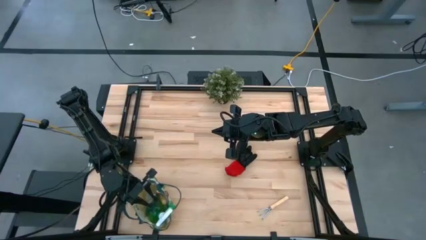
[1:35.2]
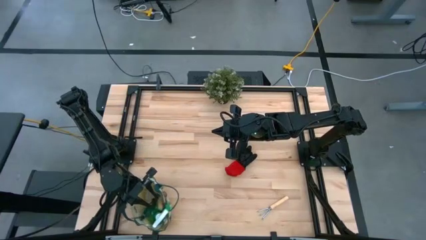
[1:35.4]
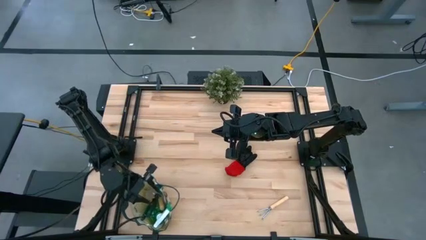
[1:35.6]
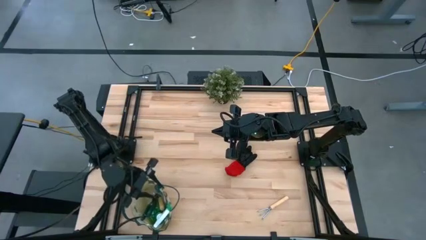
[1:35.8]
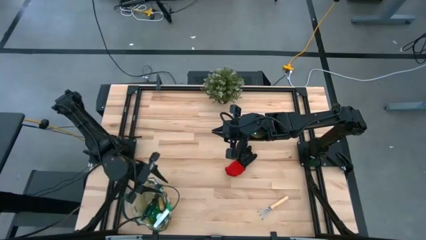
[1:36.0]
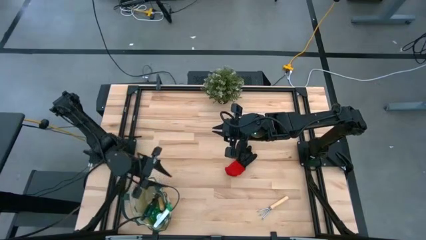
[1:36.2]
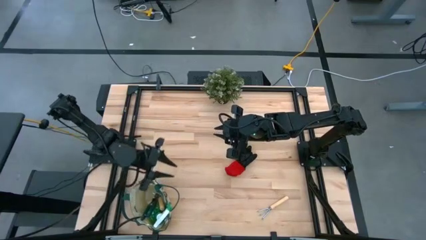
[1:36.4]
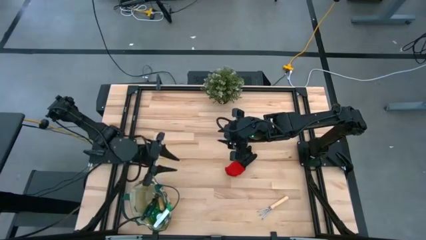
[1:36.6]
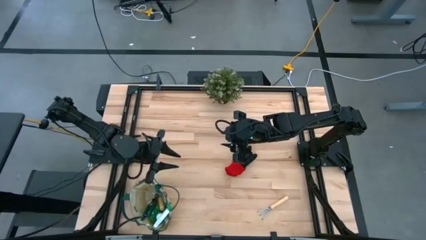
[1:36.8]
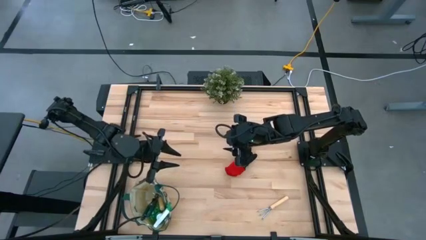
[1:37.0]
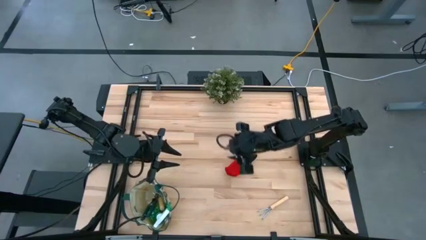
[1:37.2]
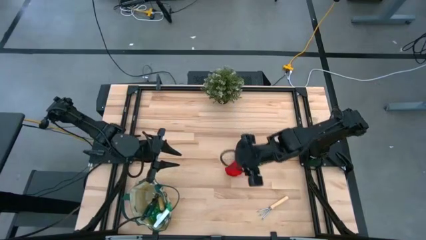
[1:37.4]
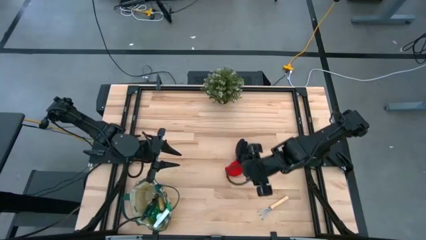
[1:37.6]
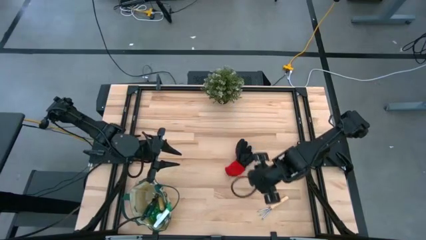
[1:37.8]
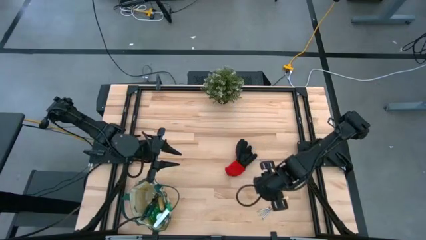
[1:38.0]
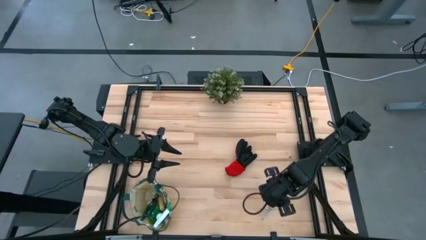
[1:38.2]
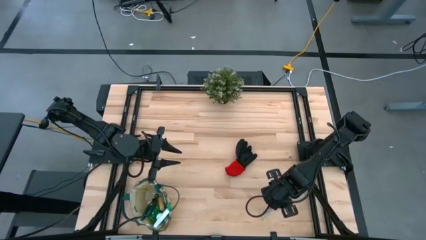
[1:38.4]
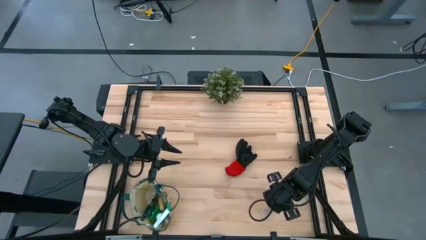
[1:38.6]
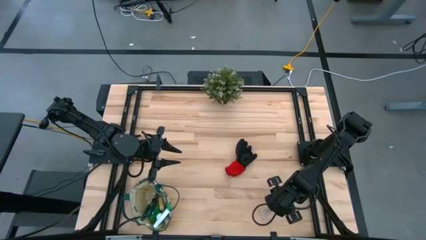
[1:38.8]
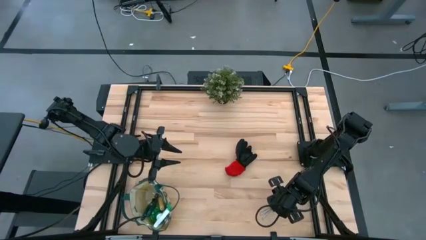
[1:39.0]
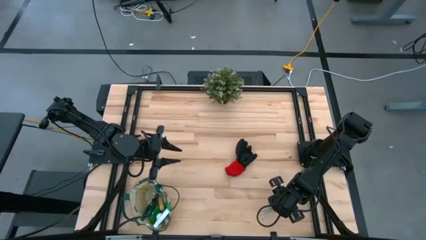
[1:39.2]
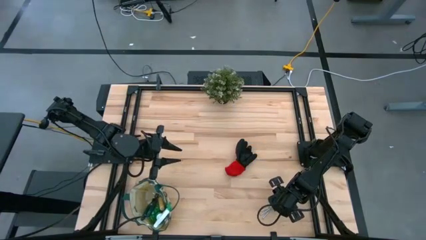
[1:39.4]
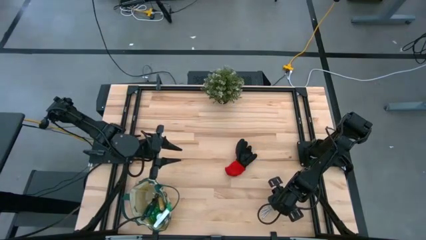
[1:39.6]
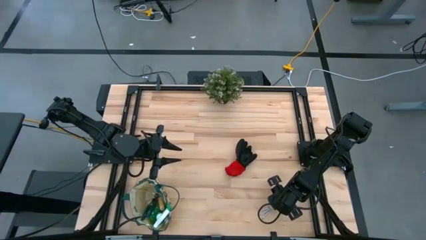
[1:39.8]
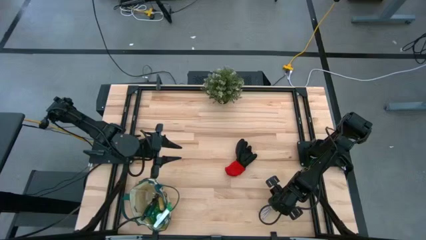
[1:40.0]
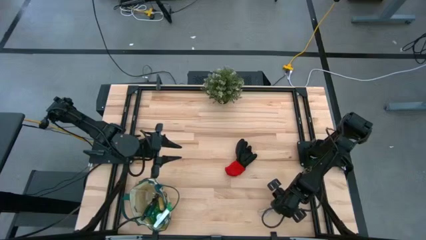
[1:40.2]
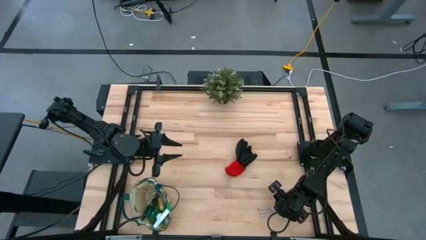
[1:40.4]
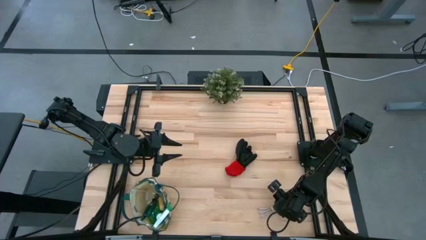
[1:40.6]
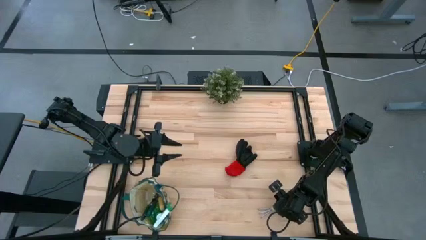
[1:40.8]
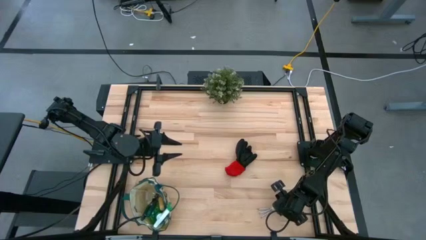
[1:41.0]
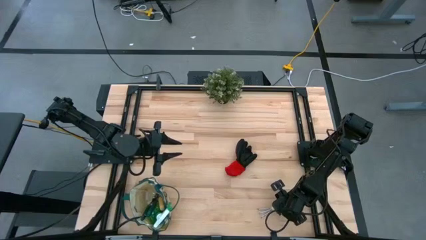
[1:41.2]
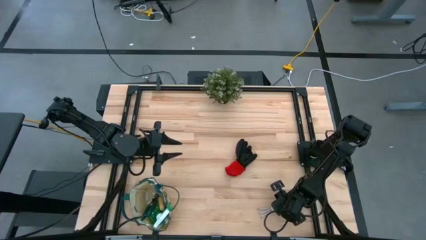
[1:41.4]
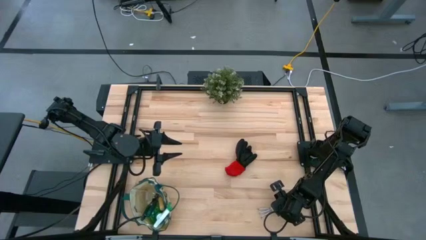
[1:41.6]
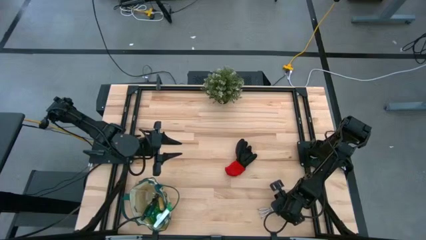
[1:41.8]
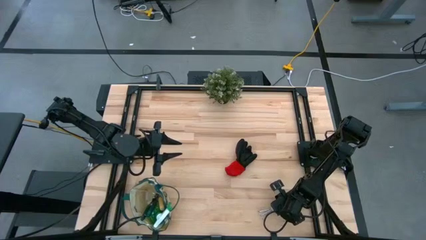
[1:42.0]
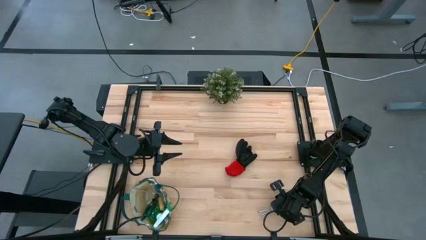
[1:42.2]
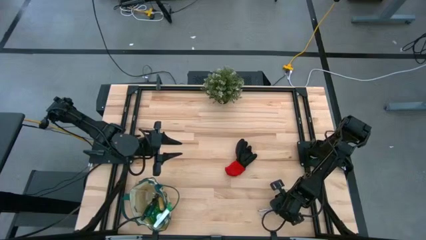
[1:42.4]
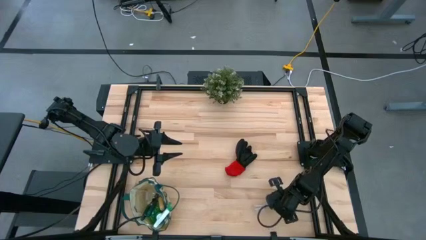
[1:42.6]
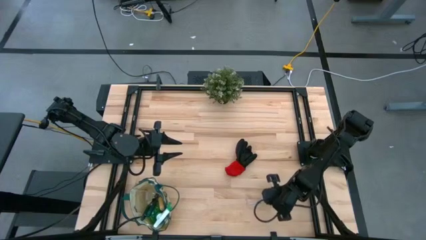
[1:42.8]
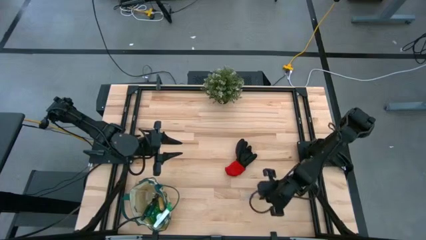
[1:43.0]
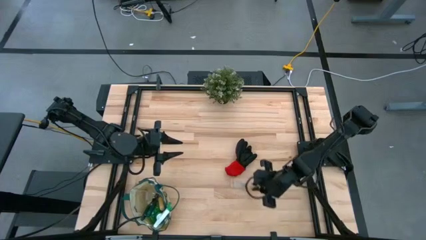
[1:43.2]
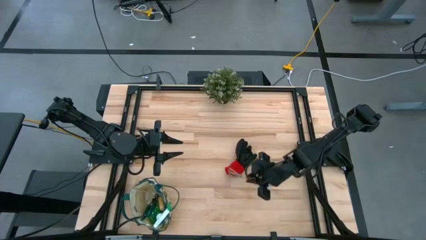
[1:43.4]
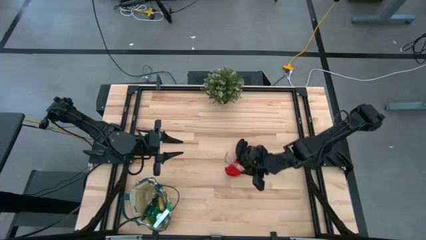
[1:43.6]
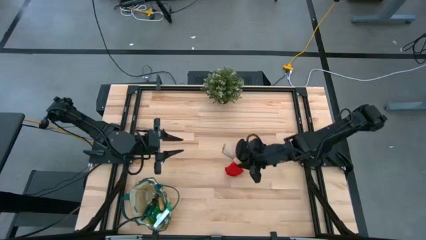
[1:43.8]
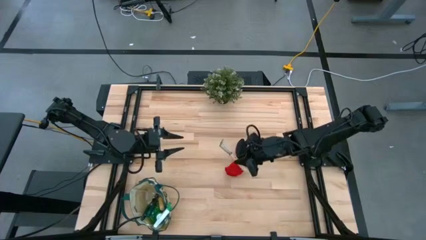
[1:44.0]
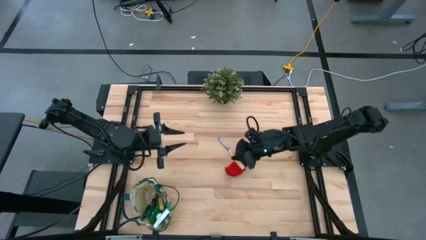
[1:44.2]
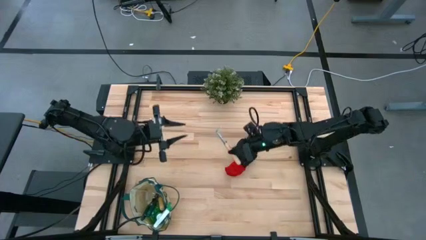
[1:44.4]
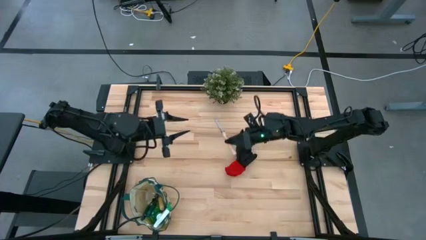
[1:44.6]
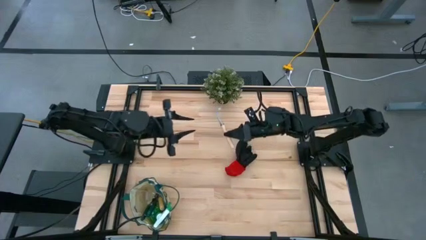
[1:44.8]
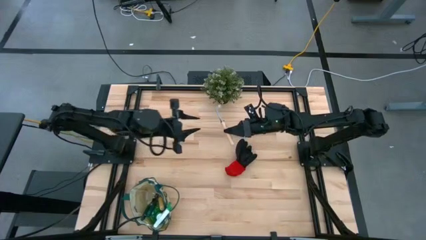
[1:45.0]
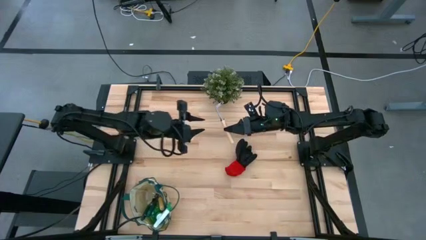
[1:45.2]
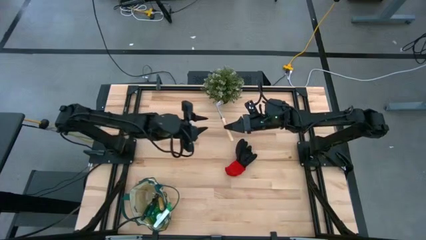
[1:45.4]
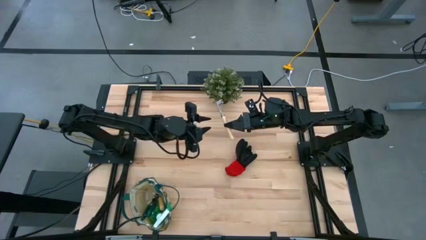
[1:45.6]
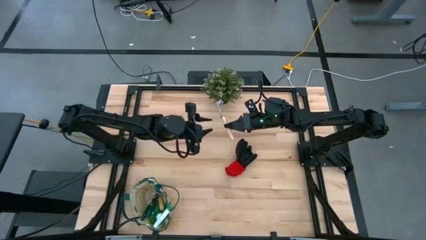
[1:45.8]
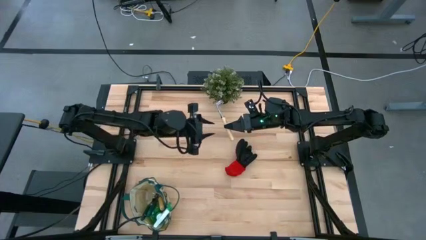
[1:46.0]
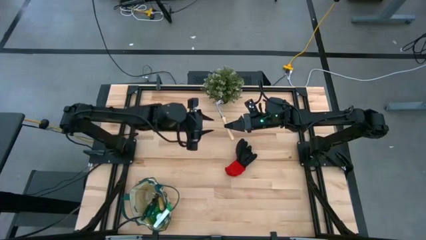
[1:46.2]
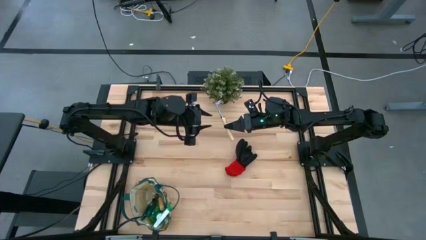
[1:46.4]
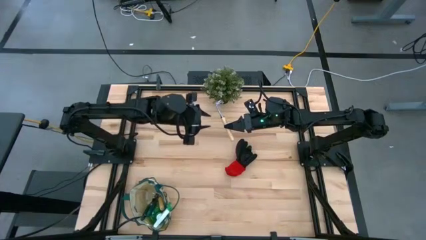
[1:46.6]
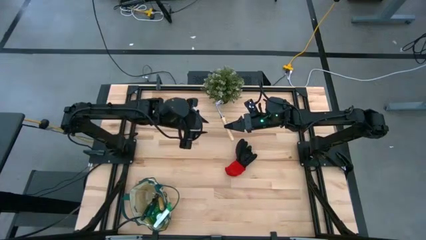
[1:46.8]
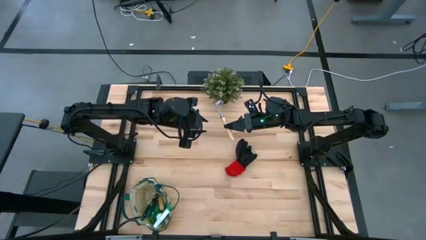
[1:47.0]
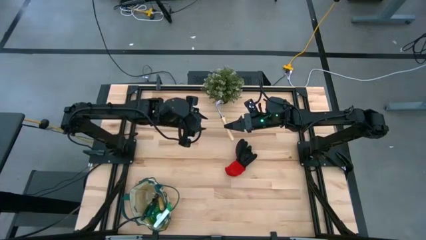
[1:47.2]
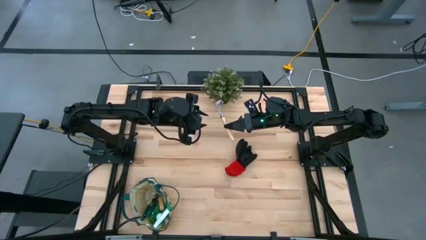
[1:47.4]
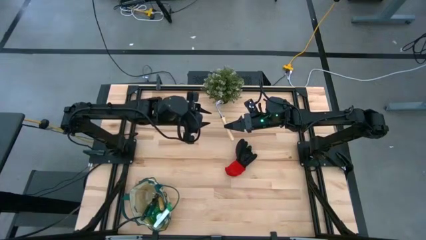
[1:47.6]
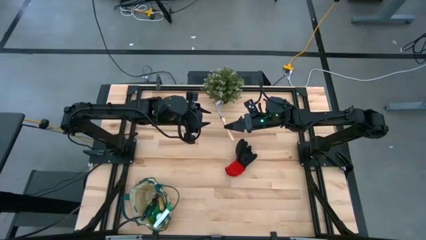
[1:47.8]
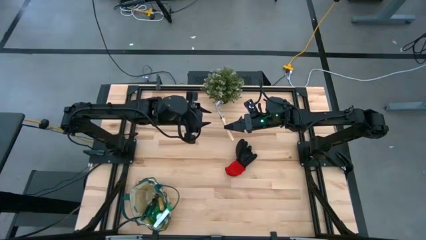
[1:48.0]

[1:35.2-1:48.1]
Task: Pick & Place Garden tools in Gardening bag
Put the brown hand rake into the gardening bag

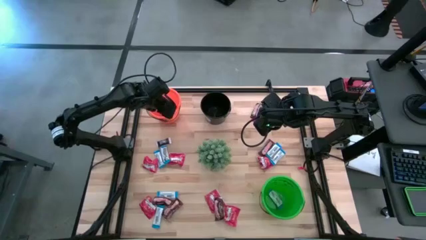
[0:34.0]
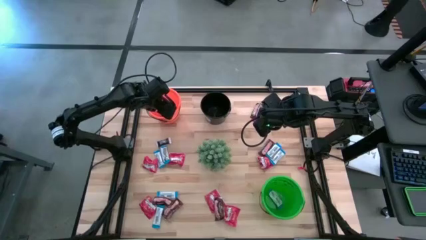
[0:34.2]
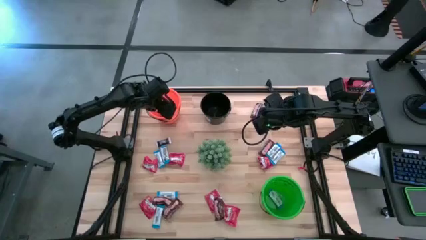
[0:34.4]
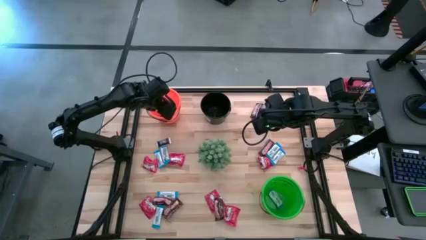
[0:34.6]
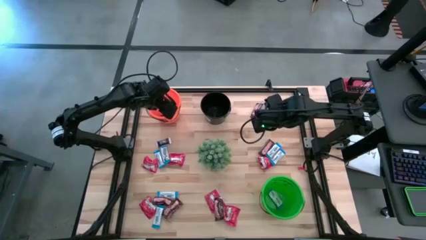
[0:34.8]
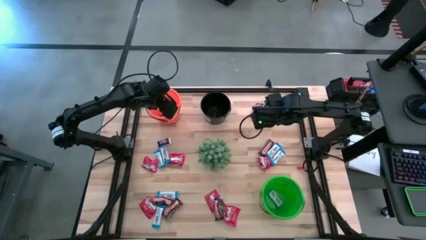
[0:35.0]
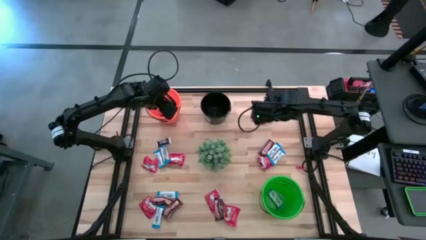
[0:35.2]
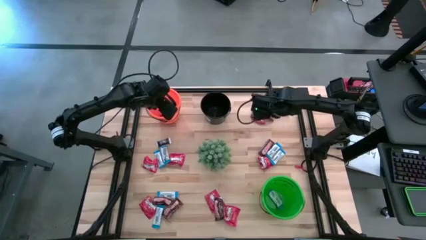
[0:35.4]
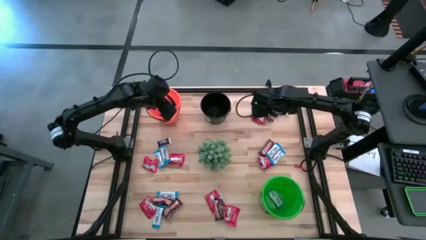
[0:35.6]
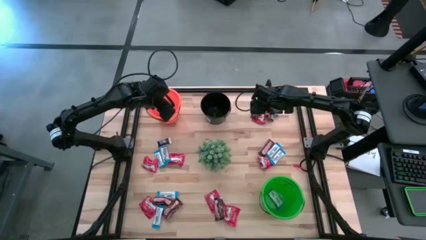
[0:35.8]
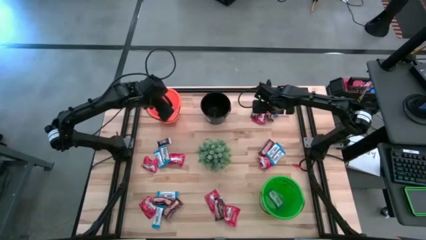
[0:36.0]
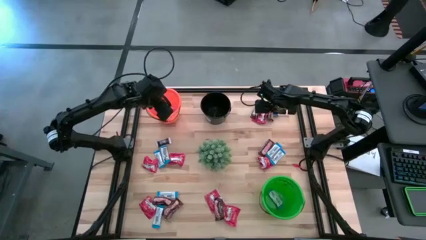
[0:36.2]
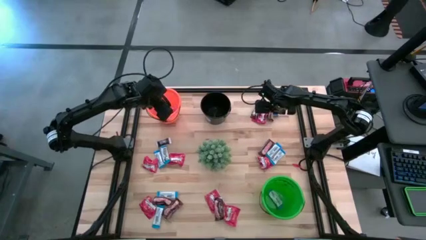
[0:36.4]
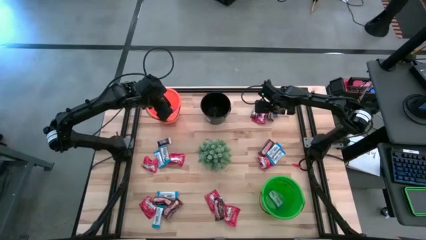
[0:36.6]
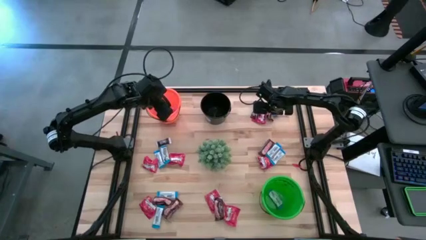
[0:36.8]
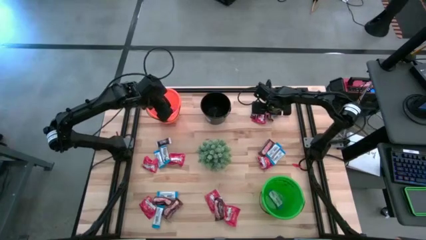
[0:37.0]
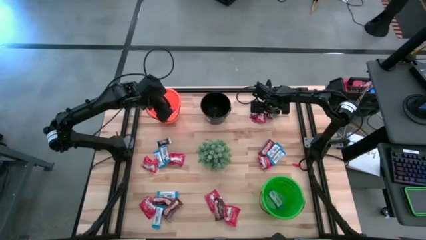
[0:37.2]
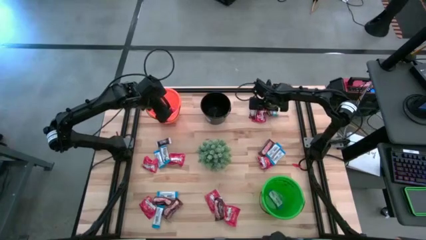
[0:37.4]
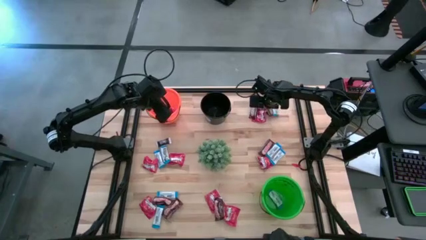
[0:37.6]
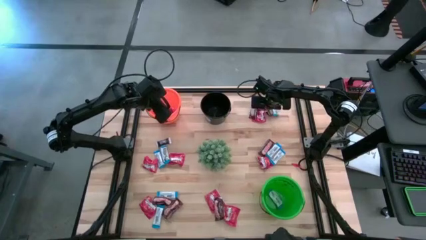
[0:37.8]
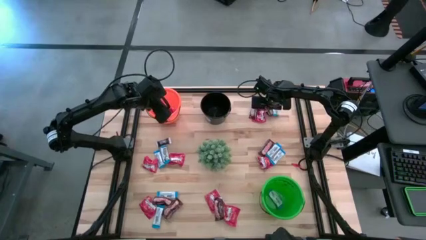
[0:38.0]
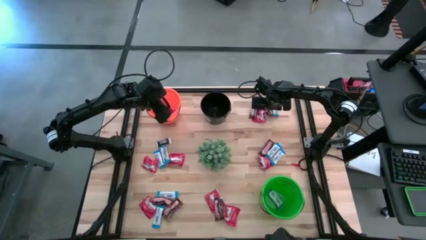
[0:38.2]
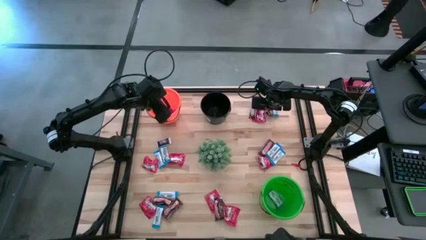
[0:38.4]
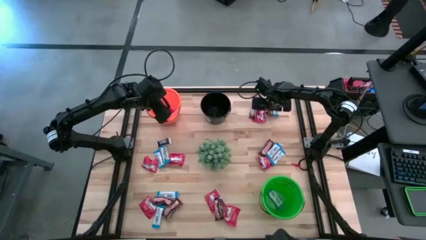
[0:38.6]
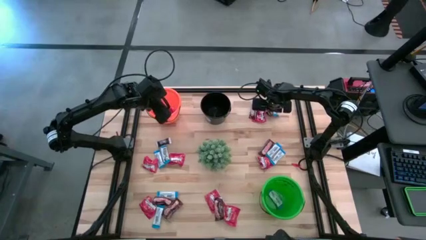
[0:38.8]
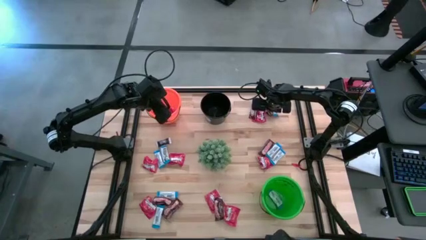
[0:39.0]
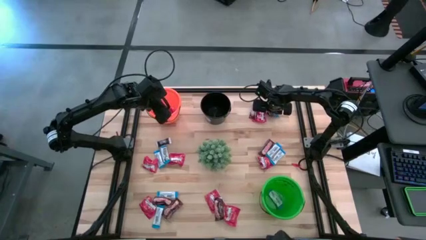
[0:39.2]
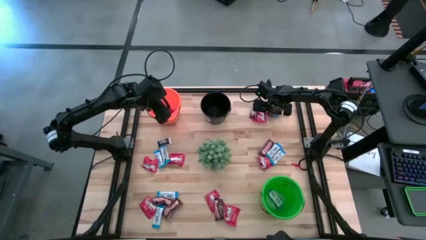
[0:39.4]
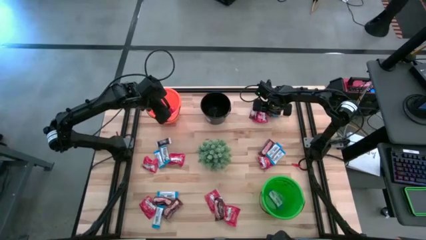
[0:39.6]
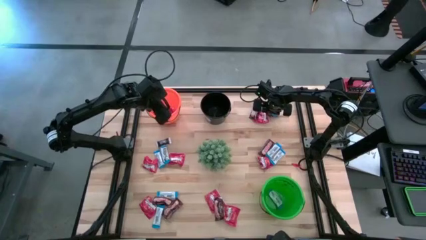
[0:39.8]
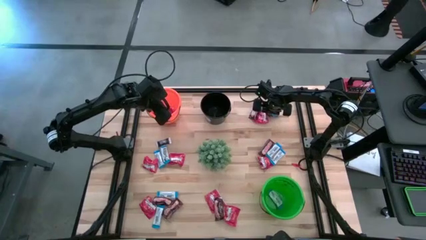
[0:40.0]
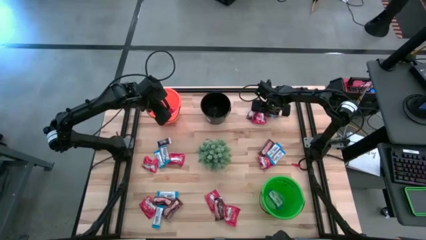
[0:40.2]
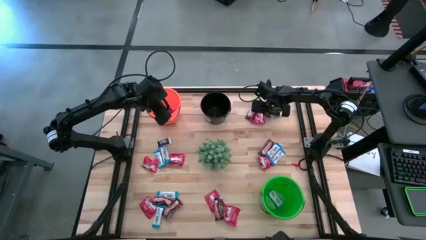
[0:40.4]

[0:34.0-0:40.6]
Task: Sort candy
Put the brown chocolate into the black bucket
